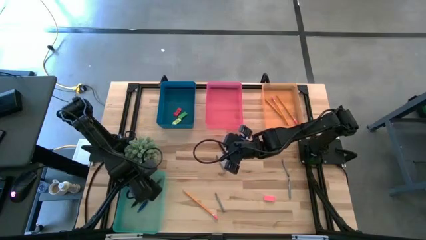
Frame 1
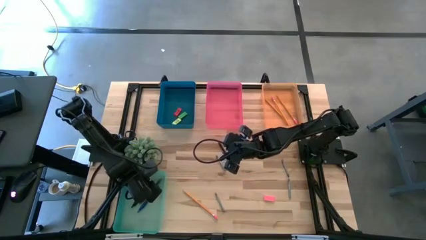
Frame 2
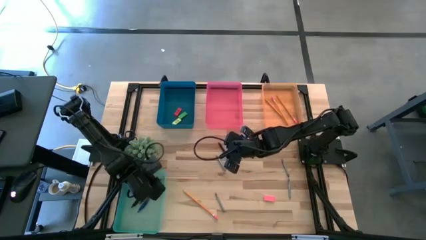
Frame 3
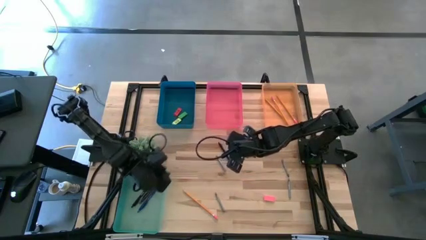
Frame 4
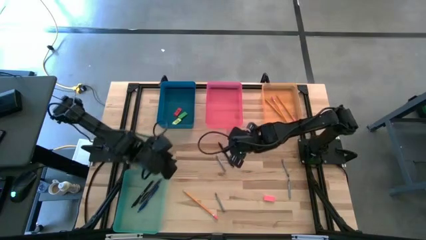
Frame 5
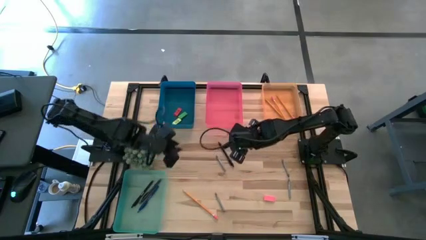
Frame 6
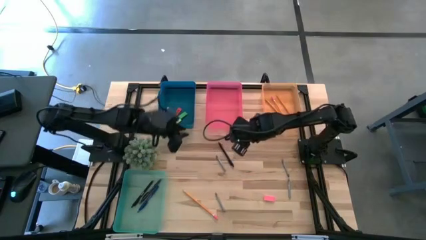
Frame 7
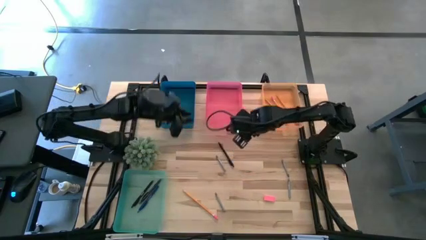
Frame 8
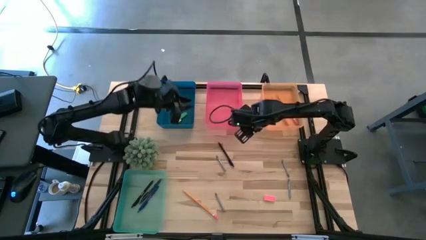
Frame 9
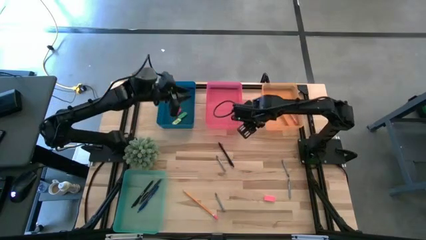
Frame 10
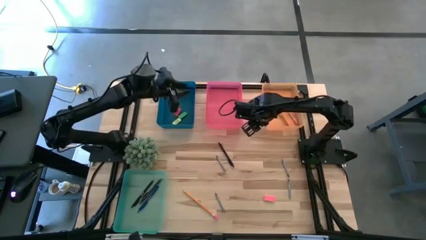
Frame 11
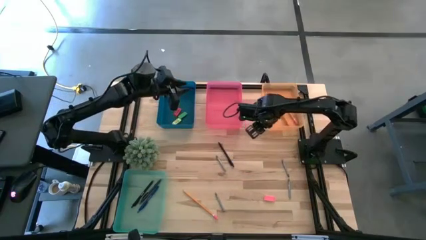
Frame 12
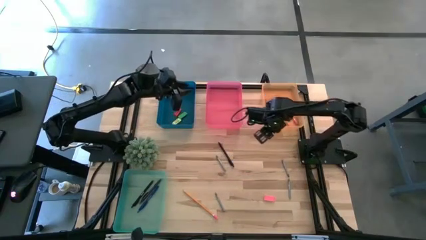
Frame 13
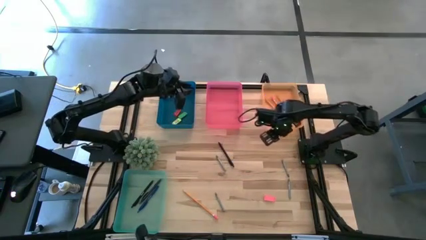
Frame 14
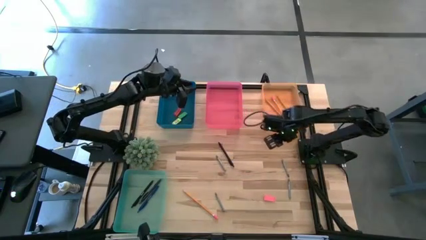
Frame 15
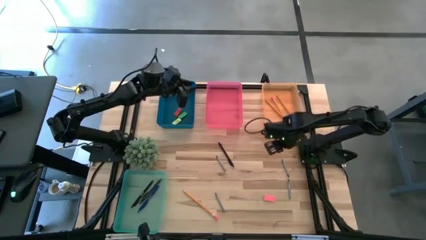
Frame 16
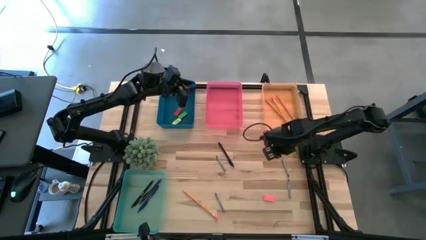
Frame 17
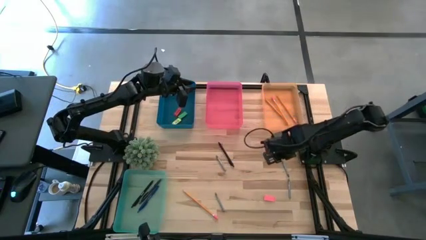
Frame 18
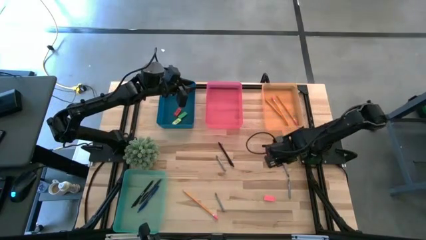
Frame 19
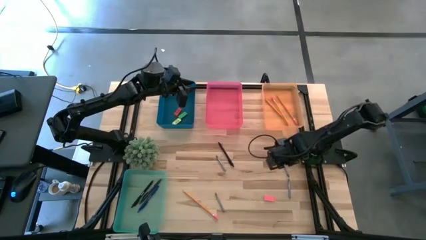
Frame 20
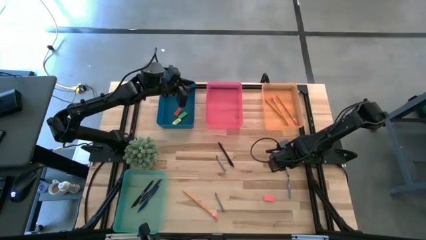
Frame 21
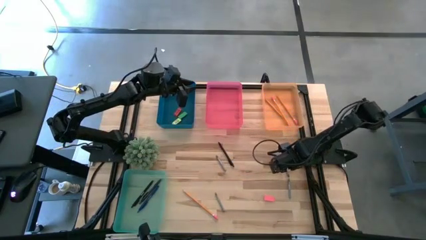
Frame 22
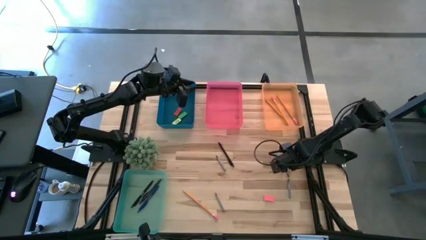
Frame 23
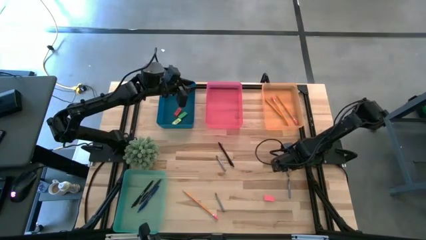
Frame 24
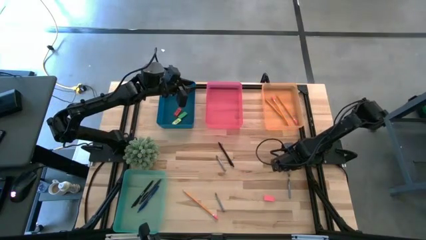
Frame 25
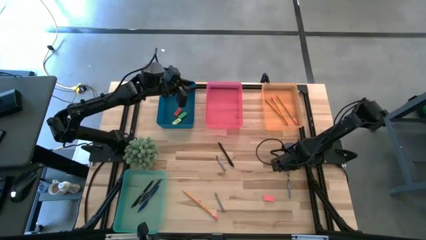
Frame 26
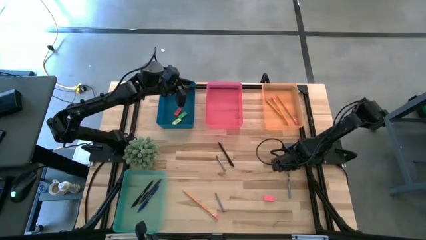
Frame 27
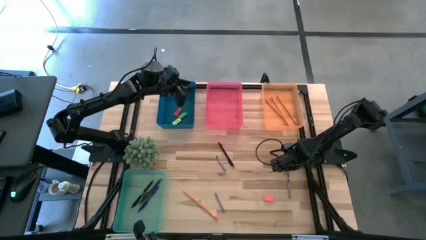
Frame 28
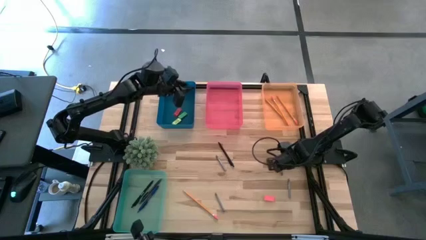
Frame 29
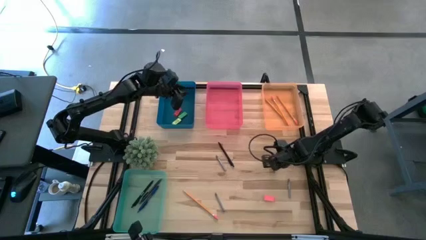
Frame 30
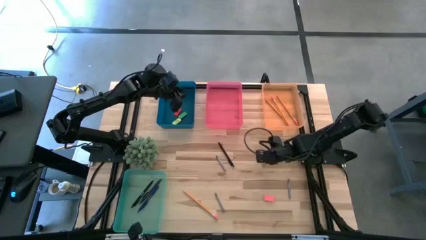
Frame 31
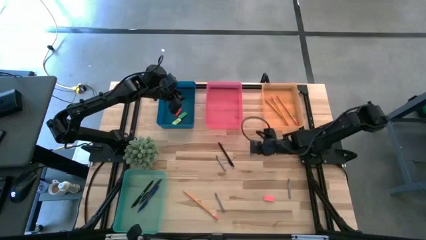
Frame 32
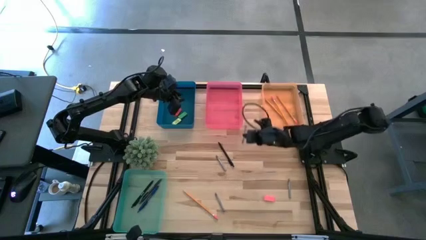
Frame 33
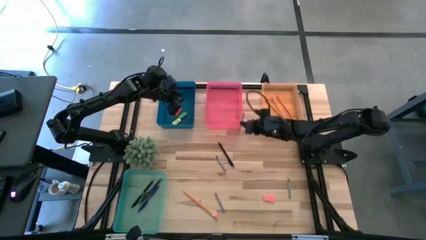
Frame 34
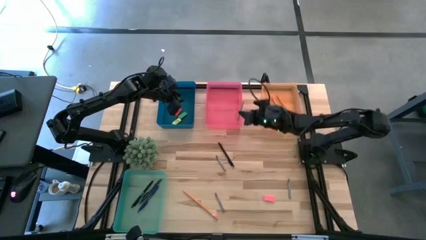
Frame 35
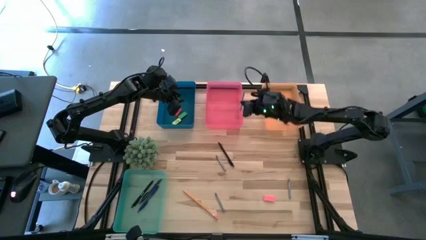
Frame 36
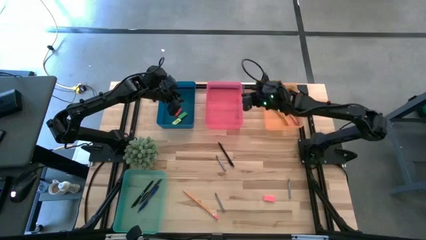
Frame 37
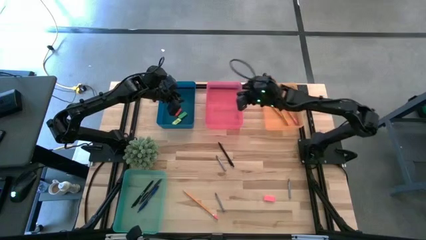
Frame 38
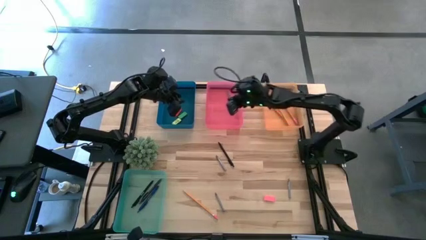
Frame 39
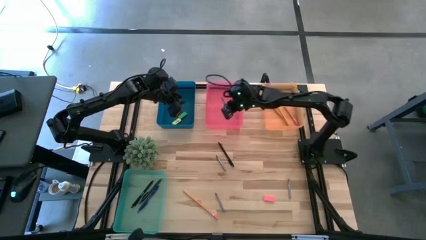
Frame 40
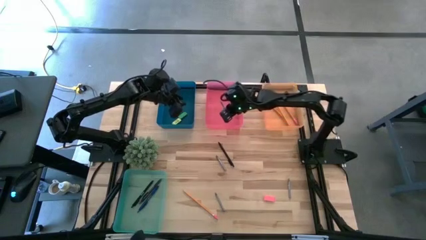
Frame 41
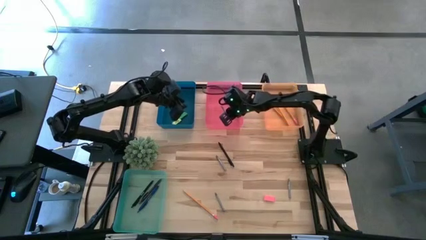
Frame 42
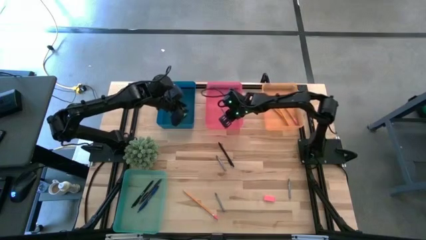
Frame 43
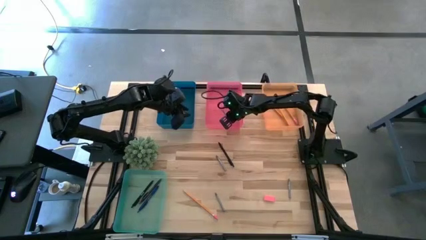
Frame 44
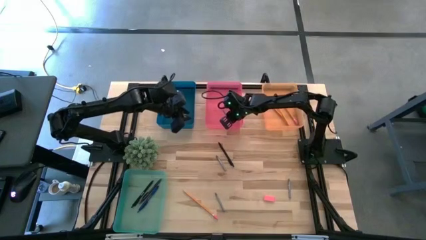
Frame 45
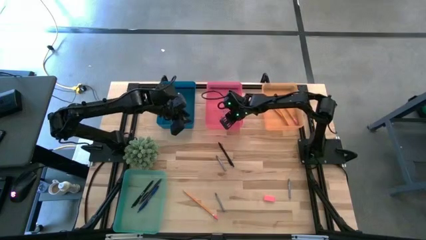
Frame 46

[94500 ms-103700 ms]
Task: Sort crayons/erasers/pens/pencils in bins
Put the top right gray crayon into the transparent red bin

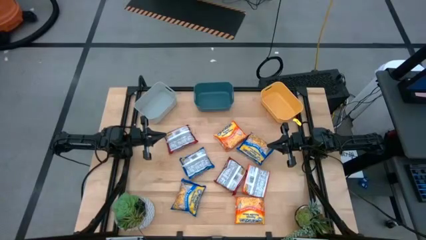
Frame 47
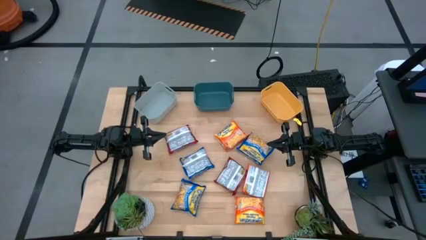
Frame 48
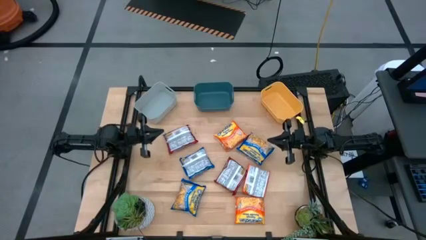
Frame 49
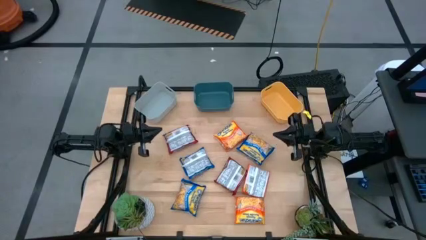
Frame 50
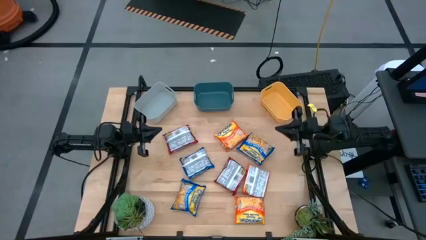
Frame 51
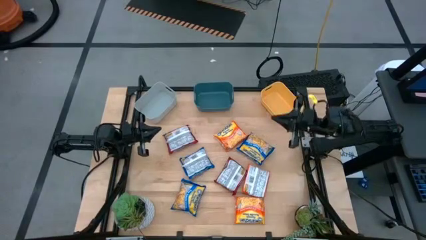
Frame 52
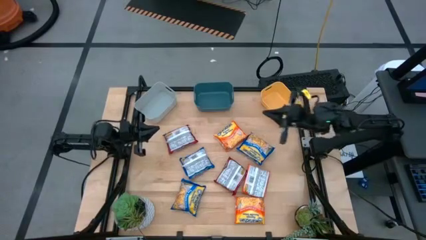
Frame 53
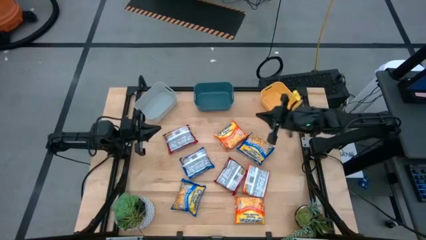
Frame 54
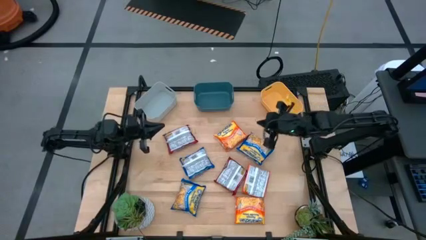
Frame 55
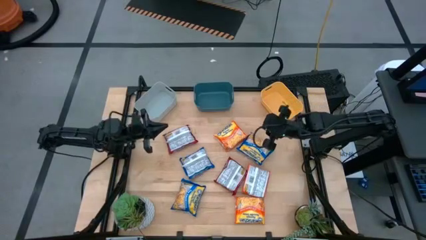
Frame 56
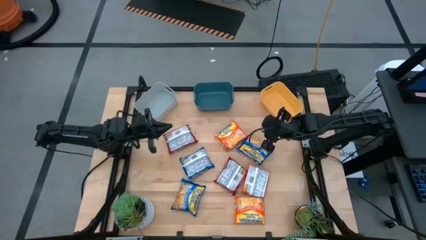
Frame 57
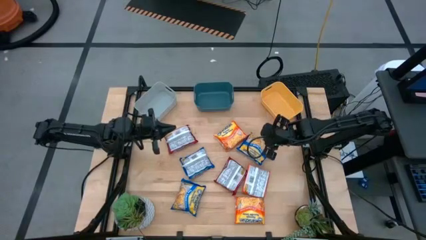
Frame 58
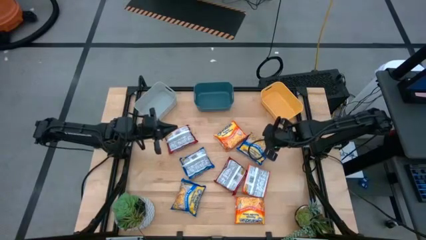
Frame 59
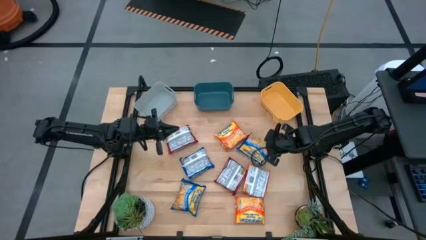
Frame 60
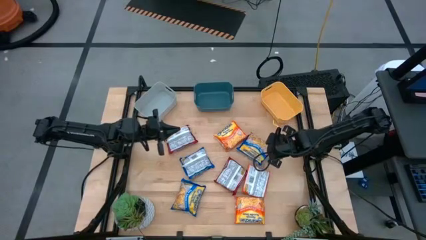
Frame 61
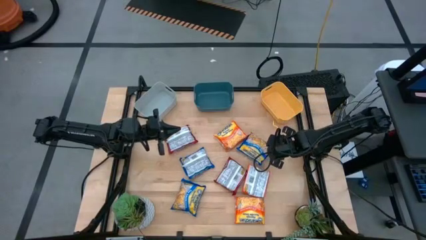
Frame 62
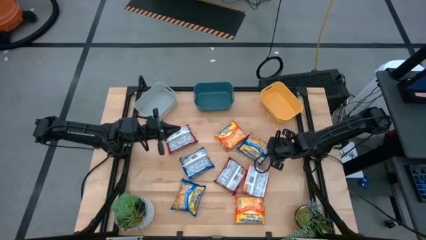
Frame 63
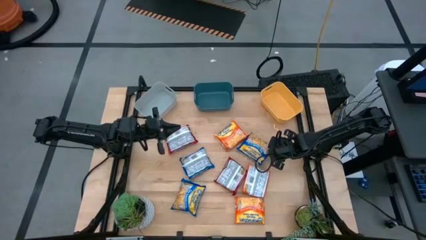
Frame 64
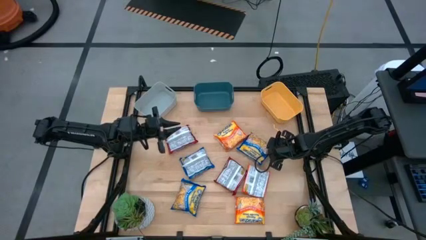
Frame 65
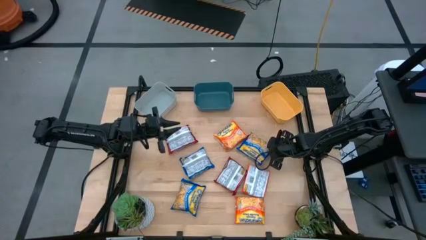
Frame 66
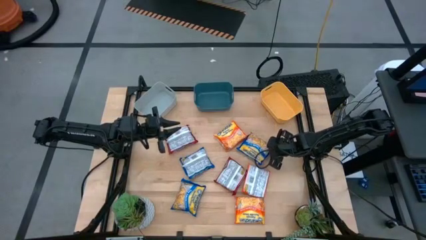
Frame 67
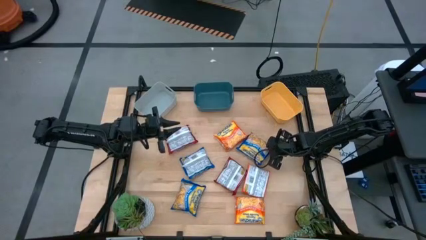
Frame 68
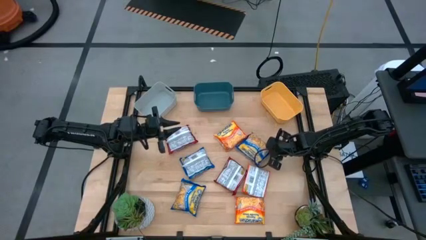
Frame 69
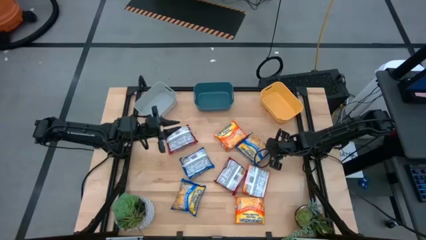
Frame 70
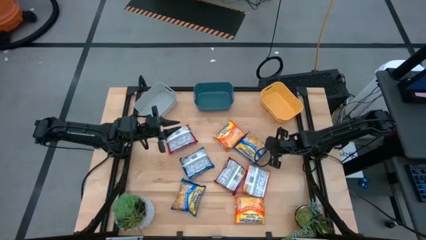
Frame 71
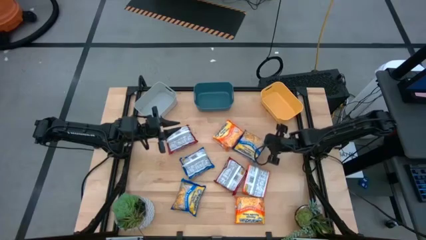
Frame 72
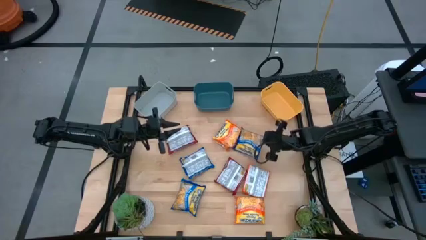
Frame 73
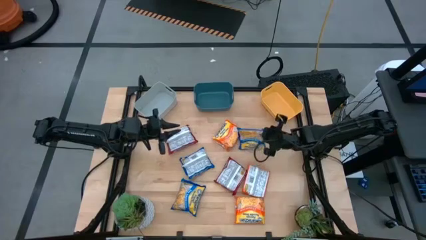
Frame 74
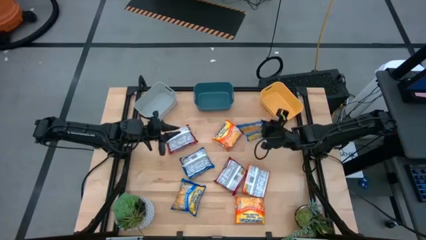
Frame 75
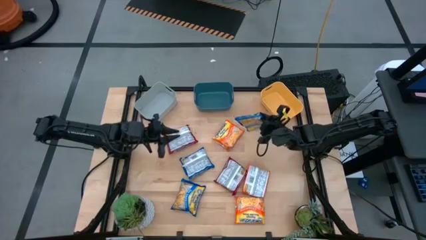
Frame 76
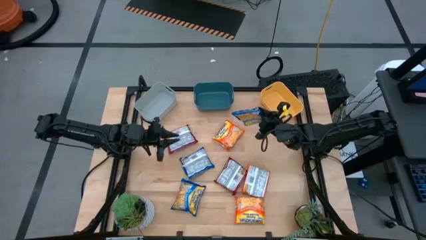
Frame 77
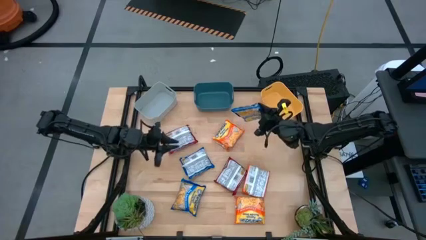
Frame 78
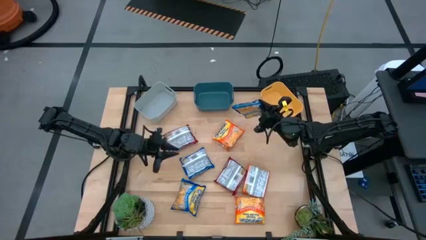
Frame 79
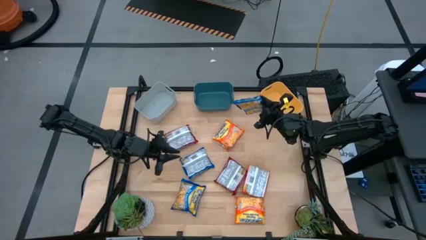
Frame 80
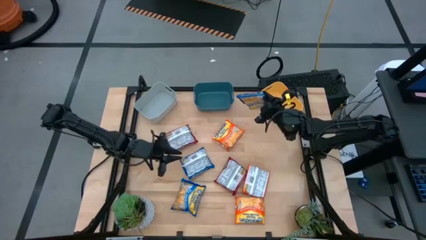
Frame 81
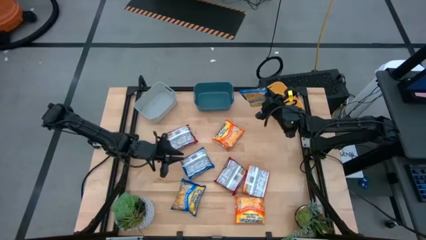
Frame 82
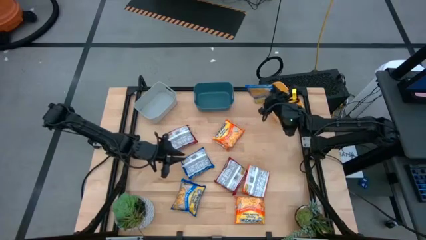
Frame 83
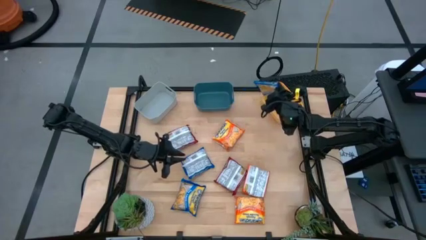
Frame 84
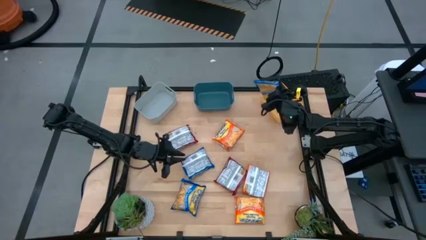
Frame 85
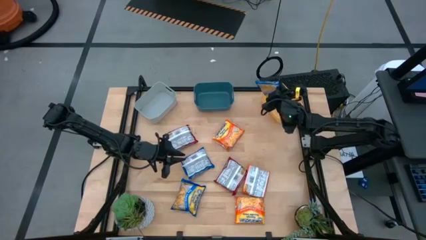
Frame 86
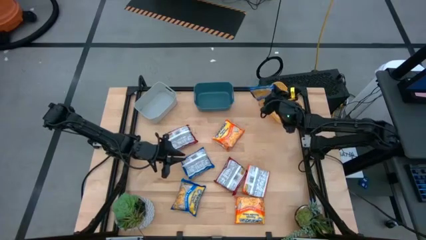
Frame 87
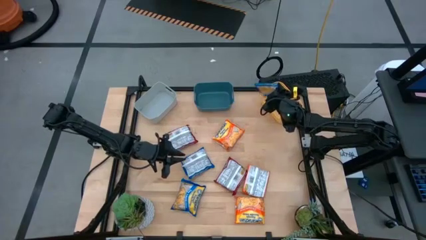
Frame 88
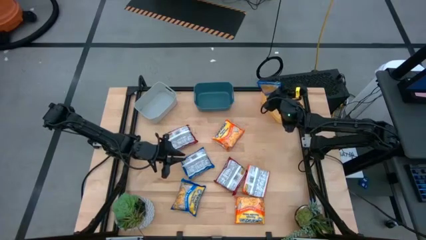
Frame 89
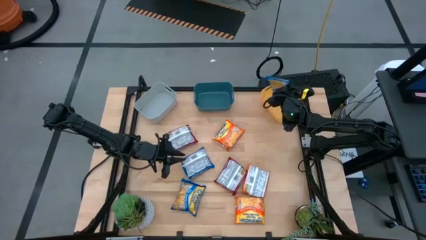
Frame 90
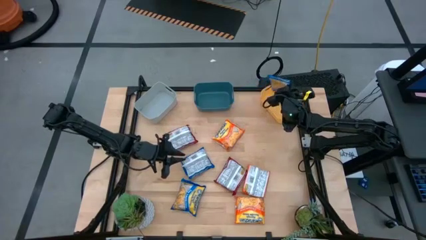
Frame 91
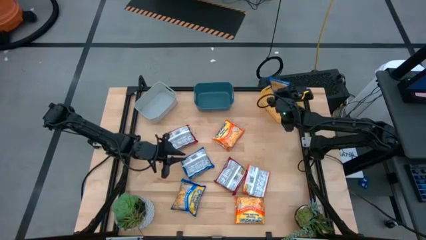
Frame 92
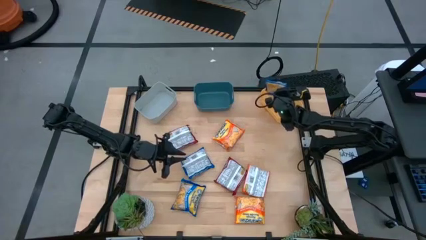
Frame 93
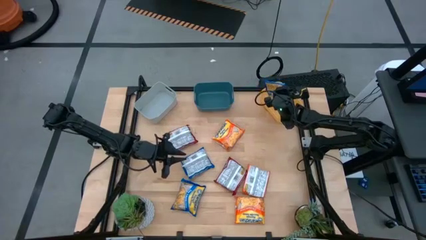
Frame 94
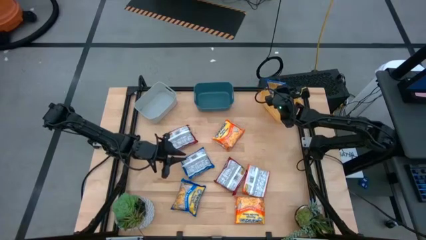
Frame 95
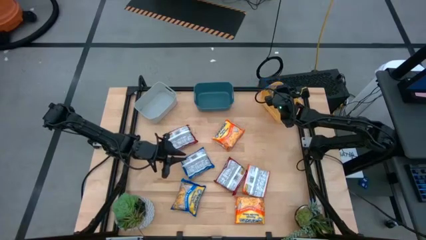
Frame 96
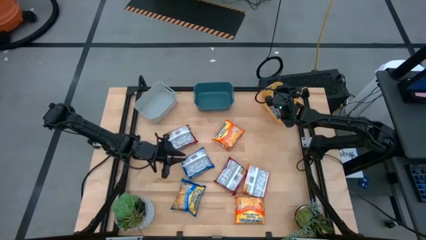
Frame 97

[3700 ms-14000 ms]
Task: Sort Maruchan noodles
Put the top blue right noodle pack into the yellow bin
